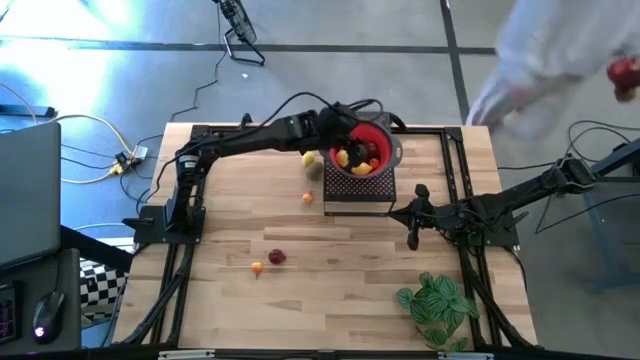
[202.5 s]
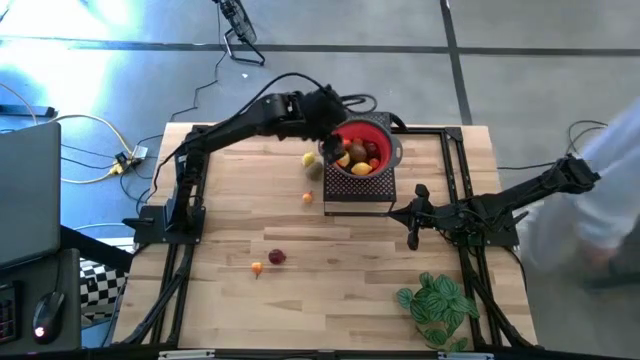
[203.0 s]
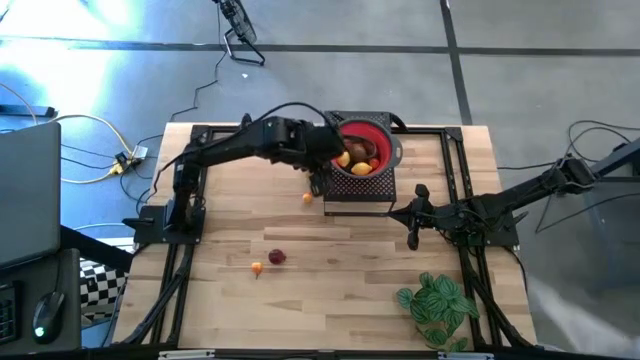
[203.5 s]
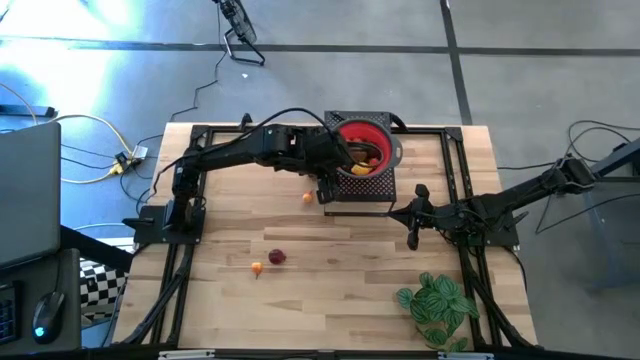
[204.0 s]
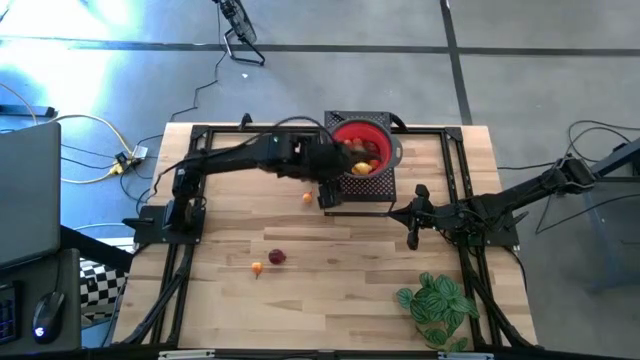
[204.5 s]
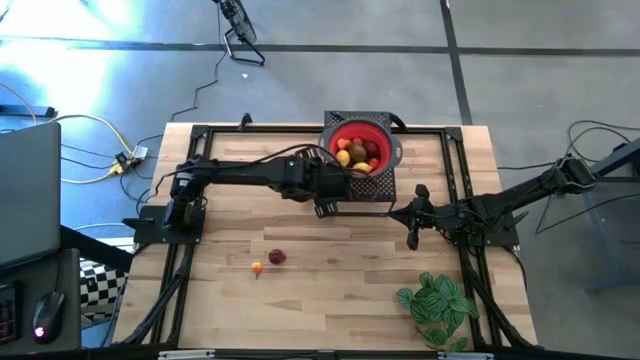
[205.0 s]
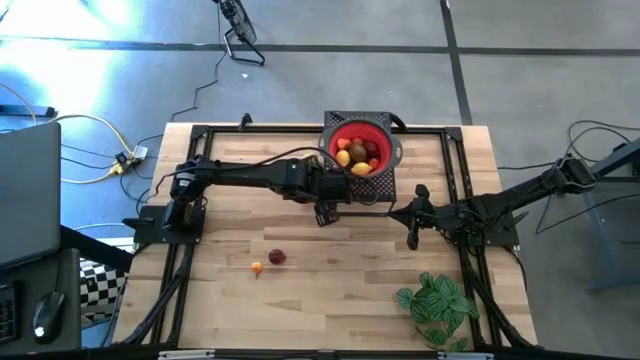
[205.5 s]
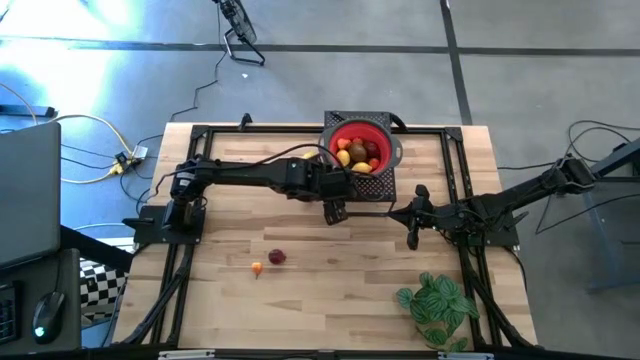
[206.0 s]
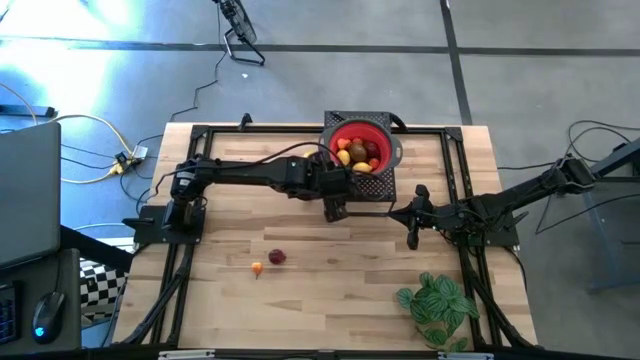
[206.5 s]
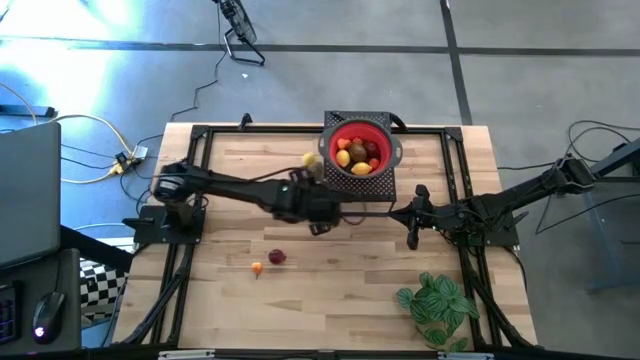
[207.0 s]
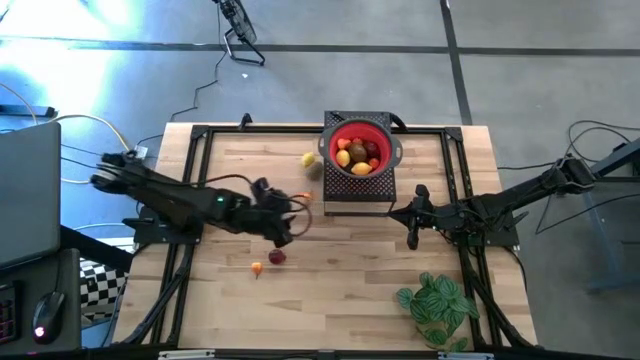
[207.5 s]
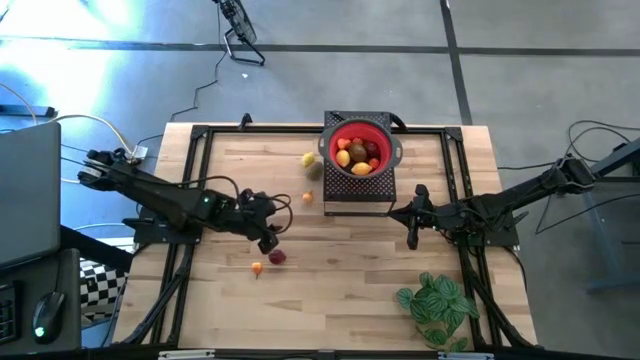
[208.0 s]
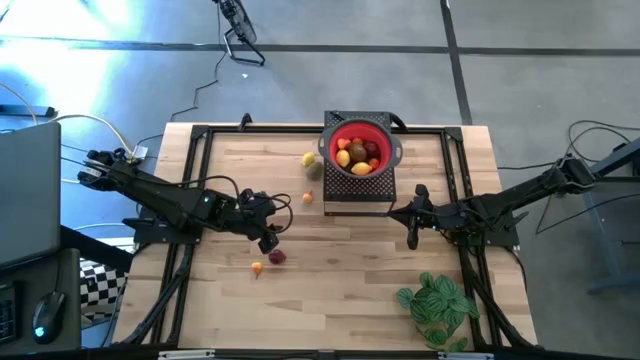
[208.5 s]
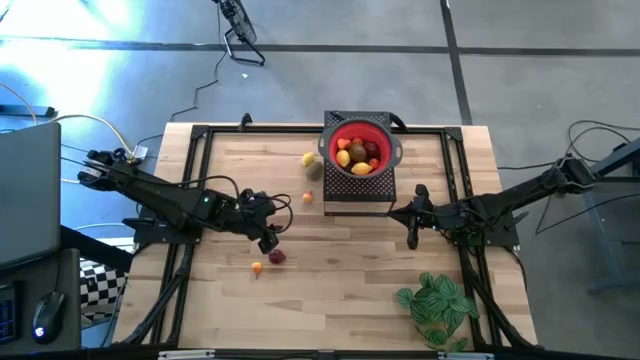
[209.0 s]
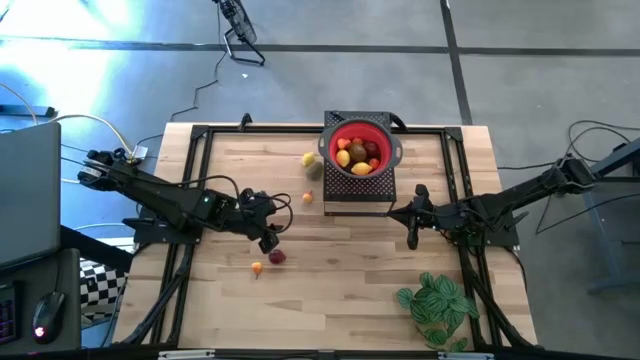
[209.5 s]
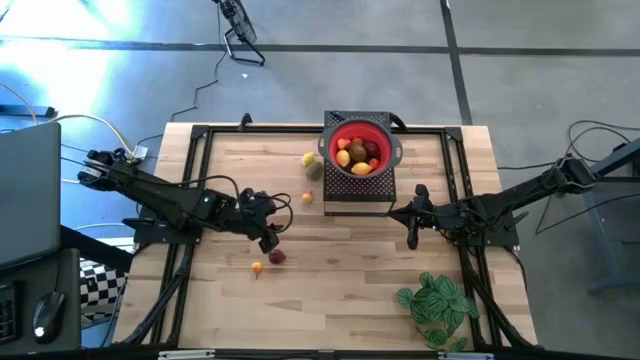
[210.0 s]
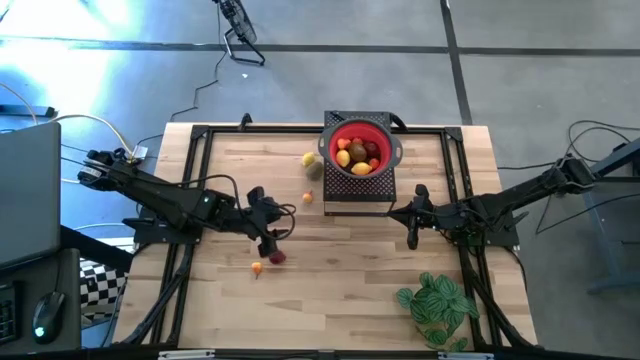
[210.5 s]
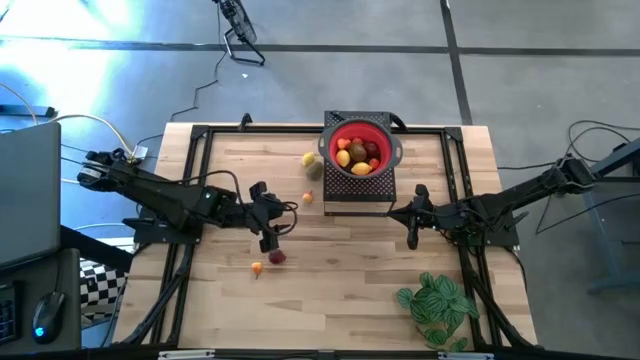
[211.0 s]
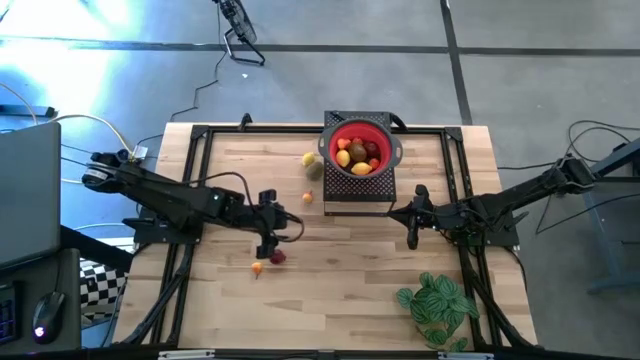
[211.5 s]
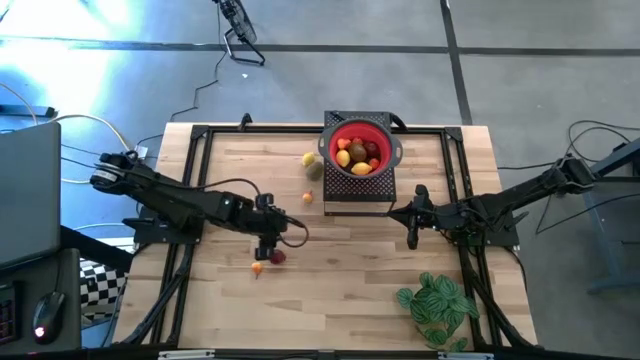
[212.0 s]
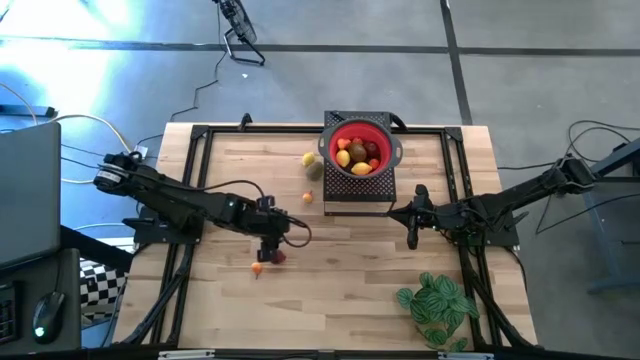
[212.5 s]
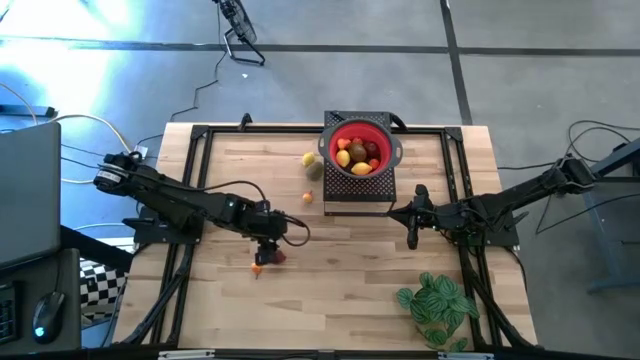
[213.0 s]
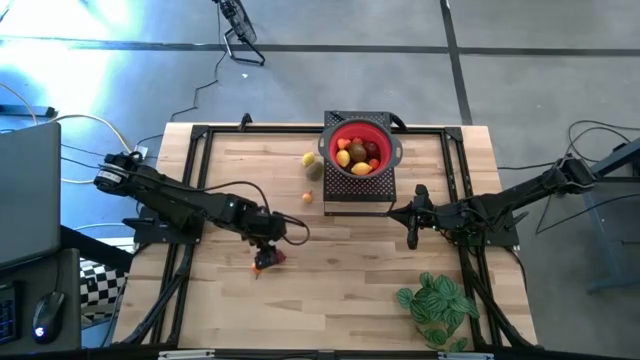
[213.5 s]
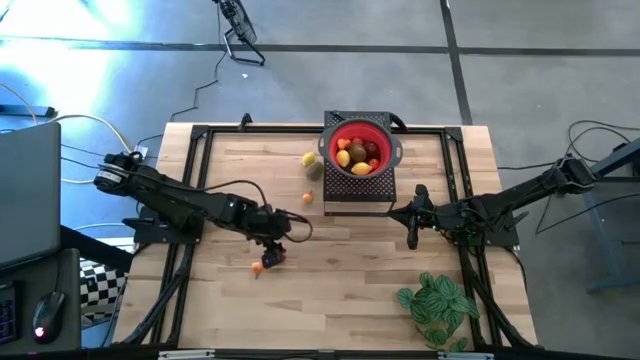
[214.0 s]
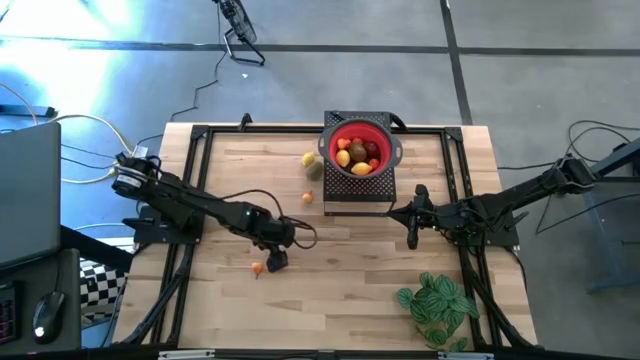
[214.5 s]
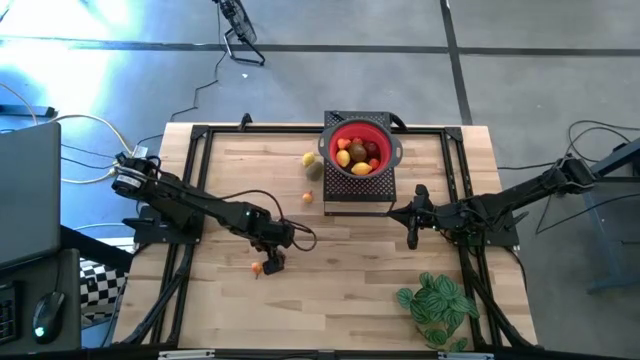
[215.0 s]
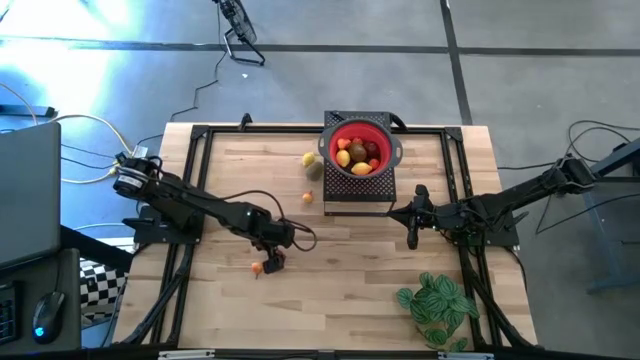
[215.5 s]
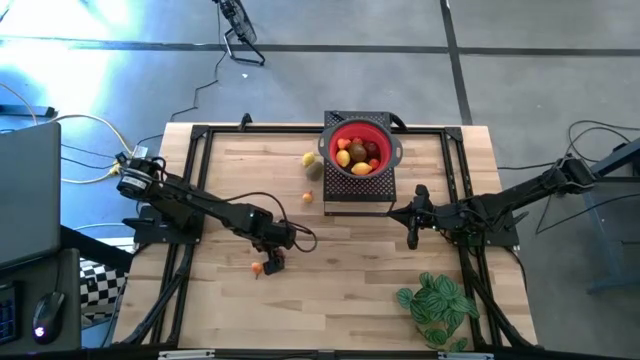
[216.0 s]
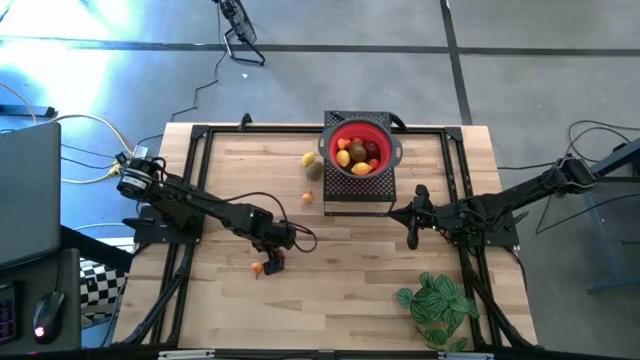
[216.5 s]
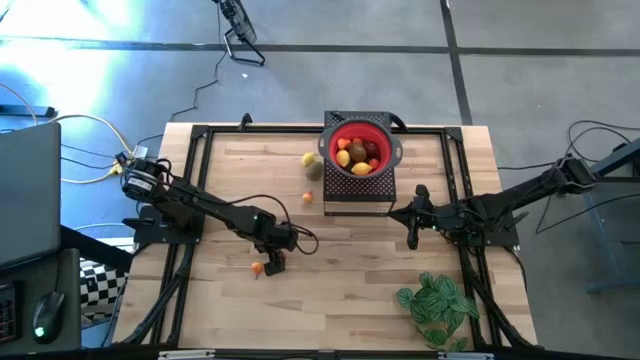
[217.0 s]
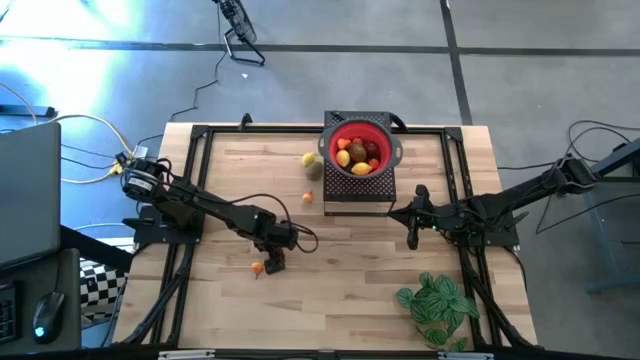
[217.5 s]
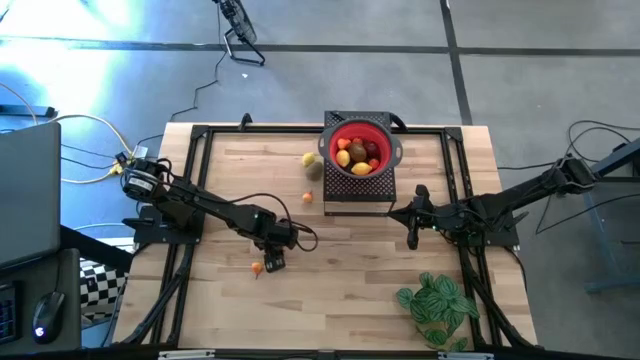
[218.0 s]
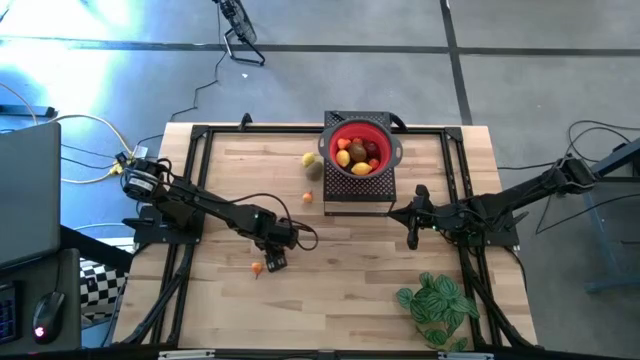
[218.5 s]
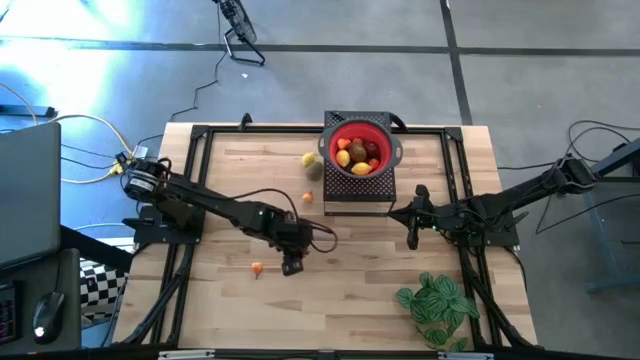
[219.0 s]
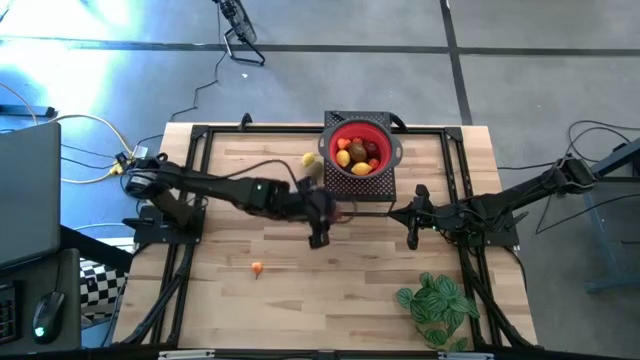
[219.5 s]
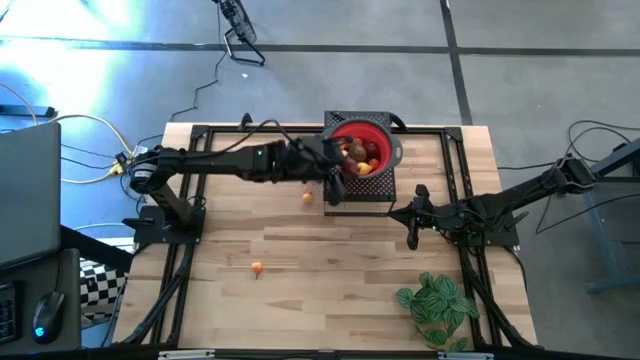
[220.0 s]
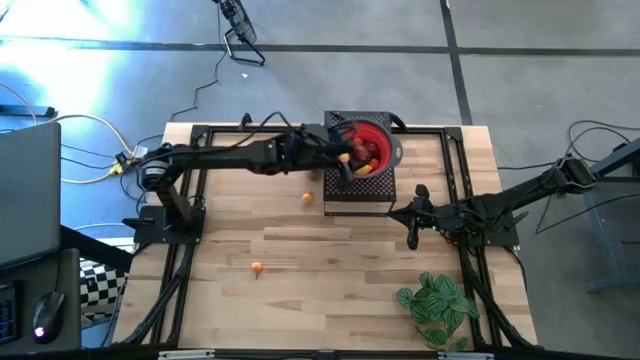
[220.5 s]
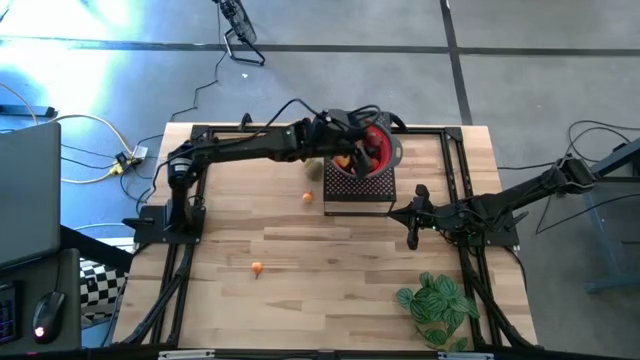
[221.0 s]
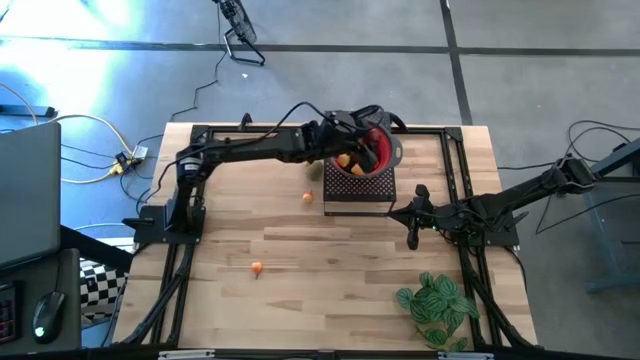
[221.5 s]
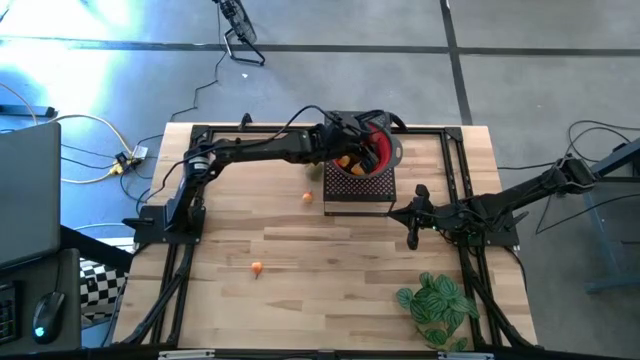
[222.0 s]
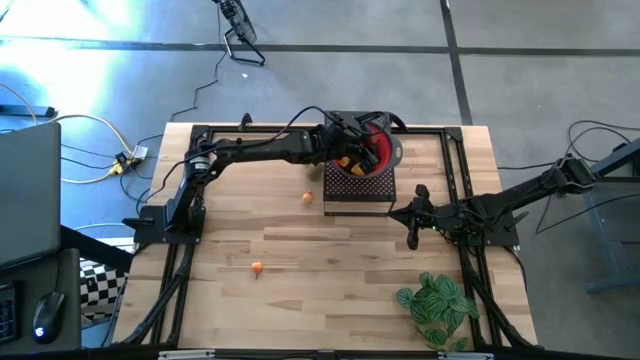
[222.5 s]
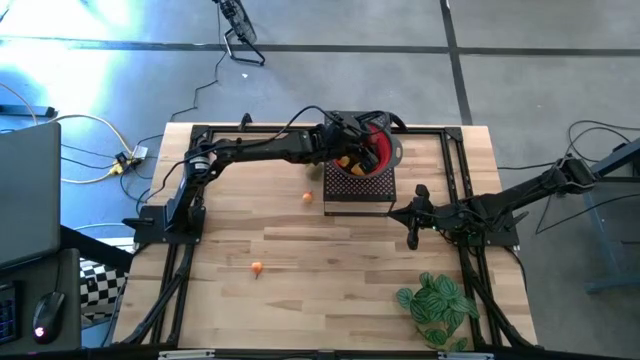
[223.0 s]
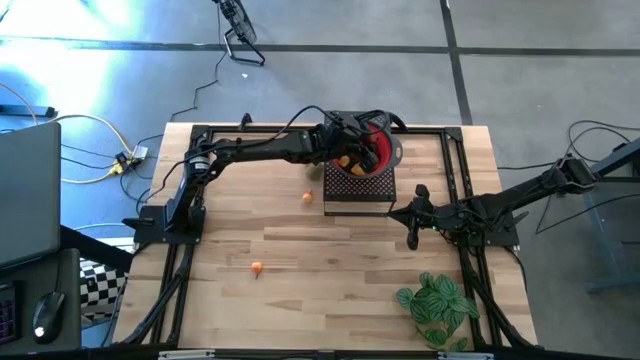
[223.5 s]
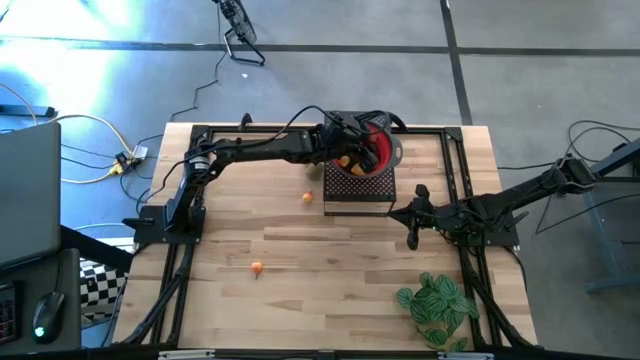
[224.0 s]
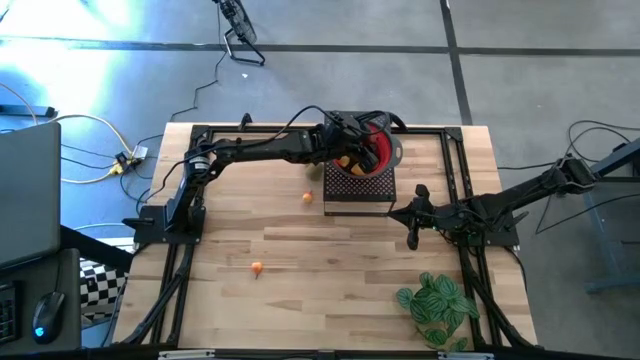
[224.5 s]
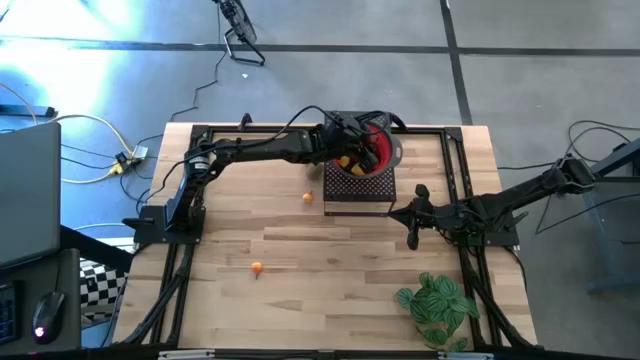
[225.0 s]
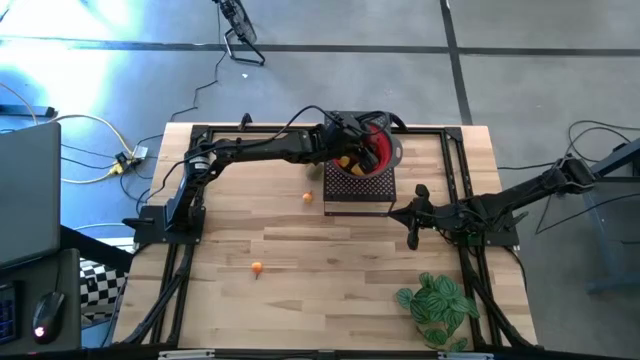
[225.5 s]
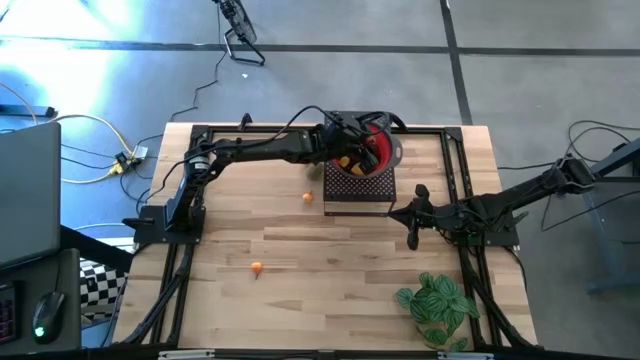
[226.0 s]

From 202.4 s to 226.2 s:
Task: Pick & Place Fruit
Put the red pomegranate into the red strainer bowl on the shelf
